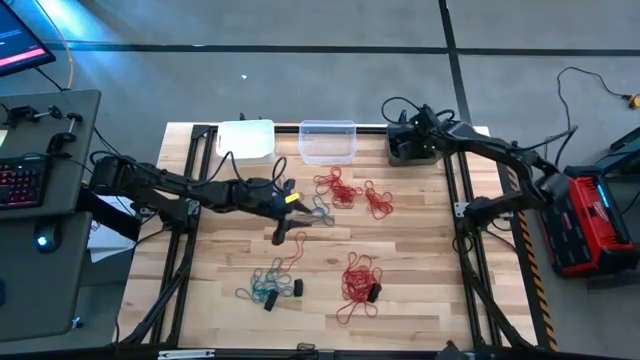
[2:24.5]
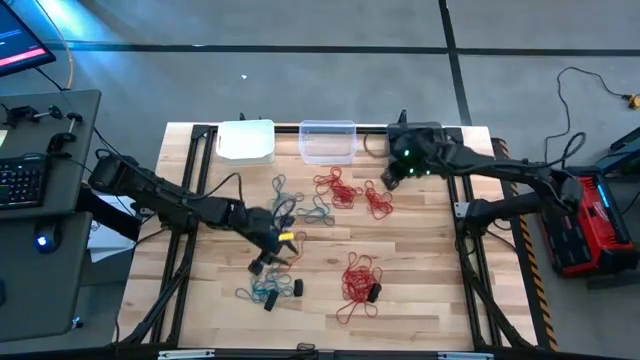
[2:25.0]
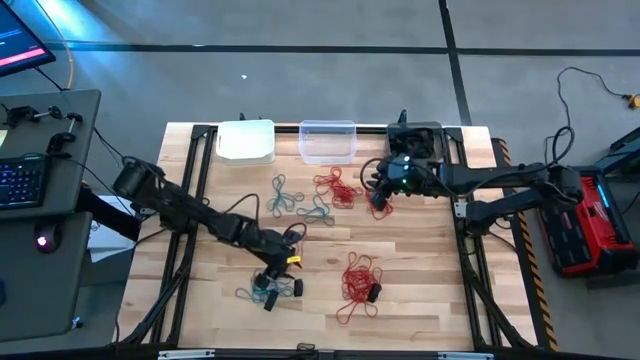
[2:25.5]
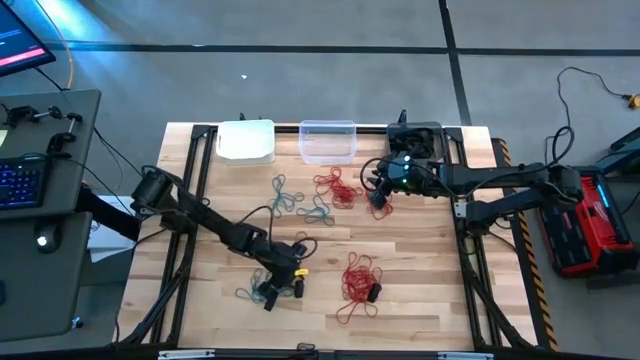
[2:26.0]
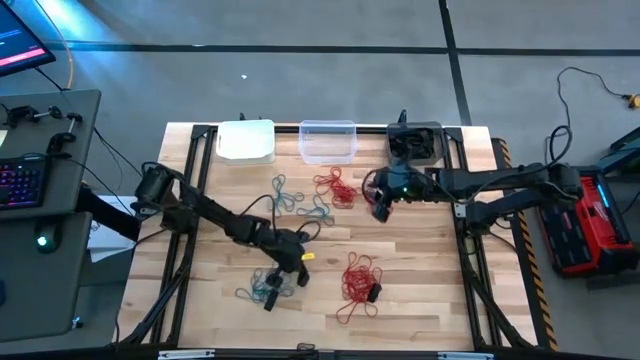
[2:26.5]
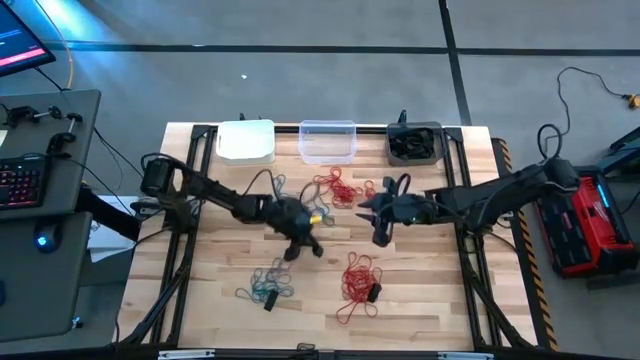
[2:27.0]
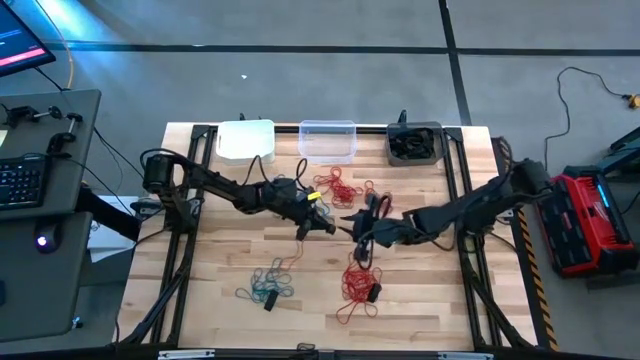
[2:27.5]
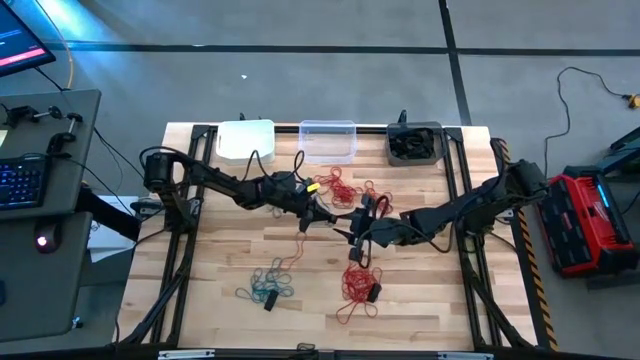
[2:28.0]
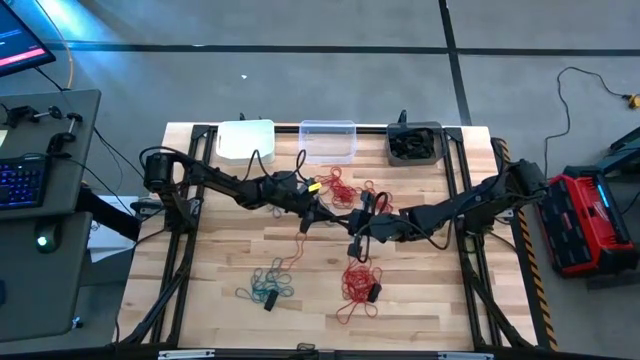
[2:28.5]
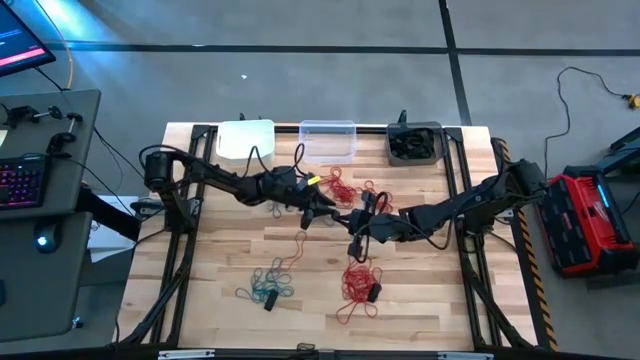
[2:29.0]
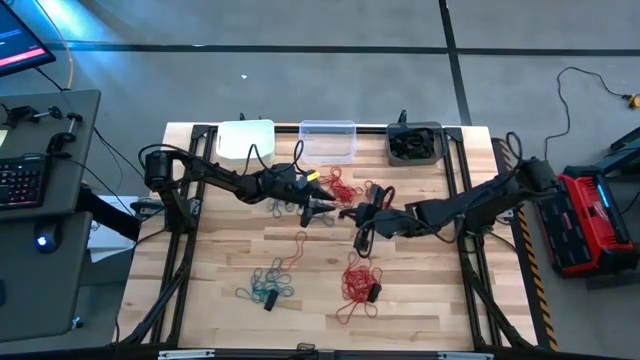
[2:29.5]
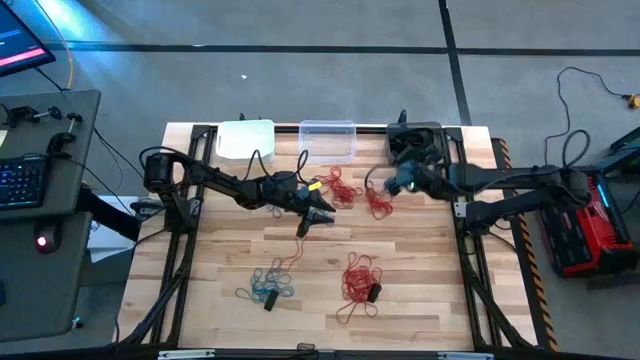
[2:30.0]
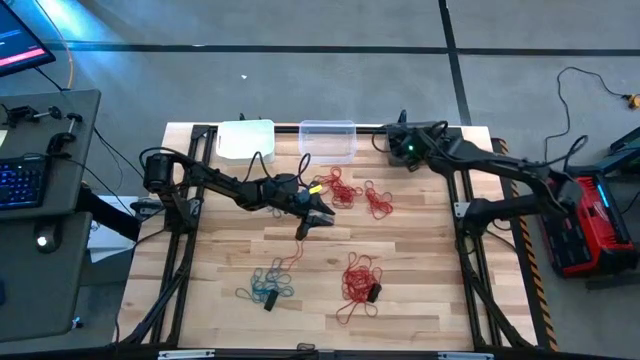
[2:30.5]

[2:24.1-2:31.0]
Task: Sort rubber bands into baskets
Put the black rubber band into the black bin

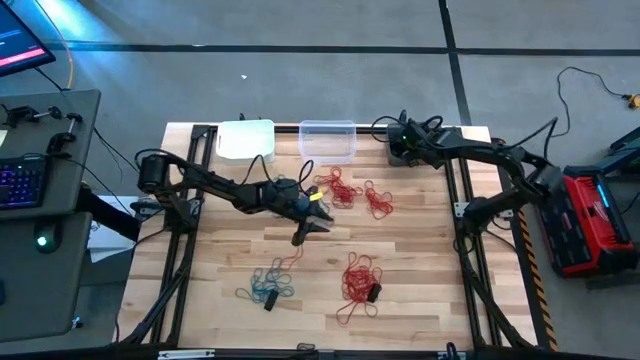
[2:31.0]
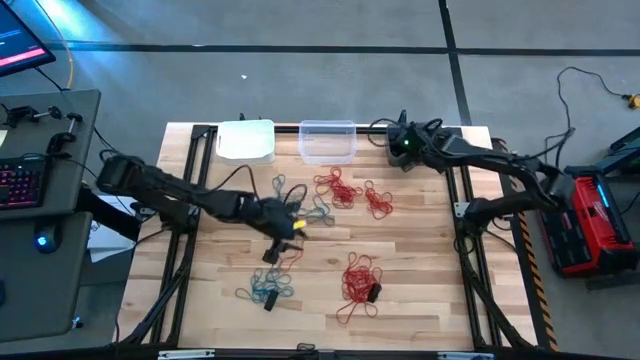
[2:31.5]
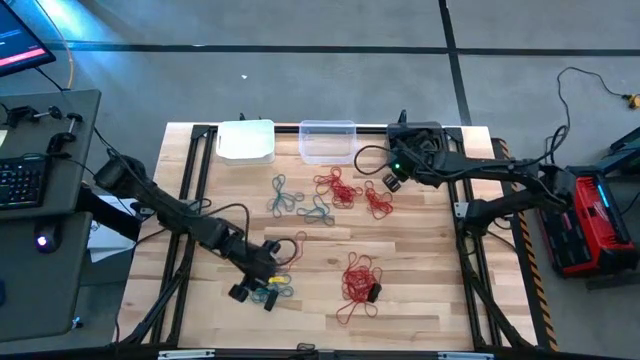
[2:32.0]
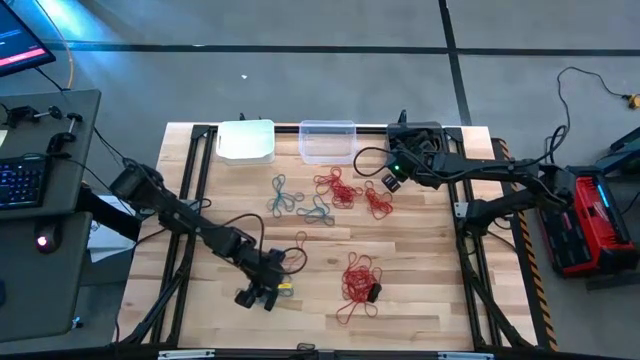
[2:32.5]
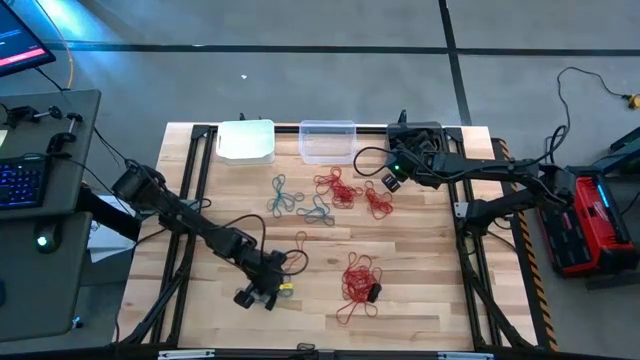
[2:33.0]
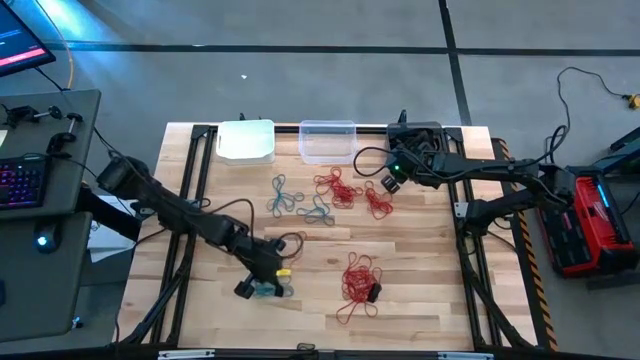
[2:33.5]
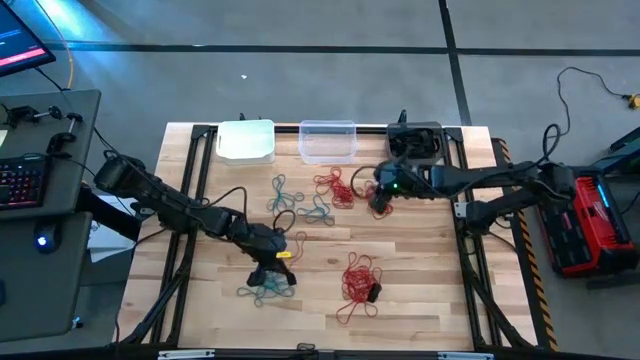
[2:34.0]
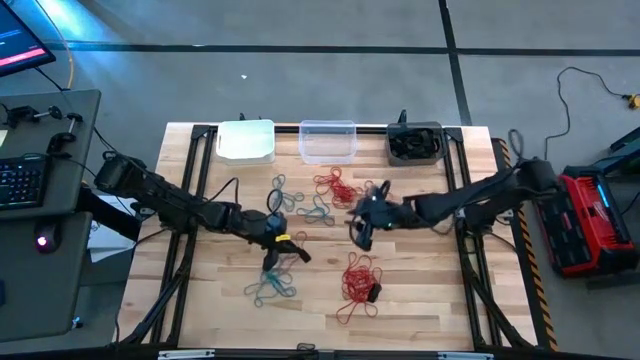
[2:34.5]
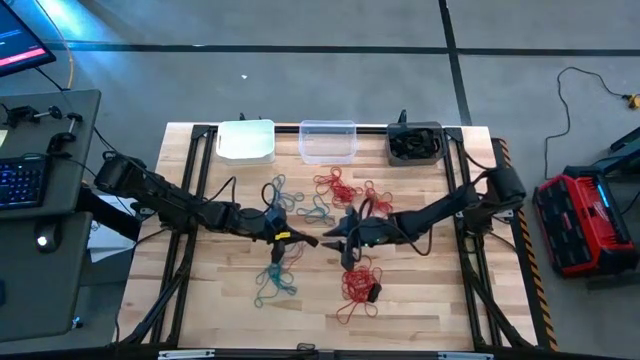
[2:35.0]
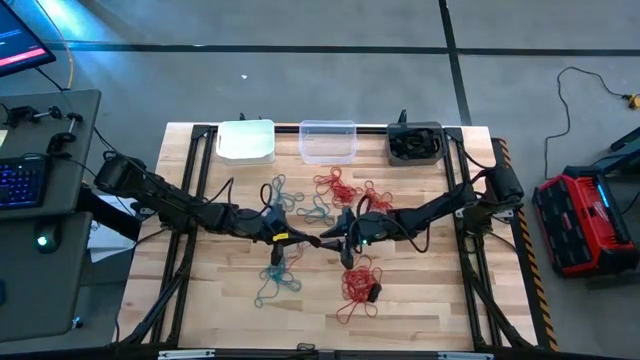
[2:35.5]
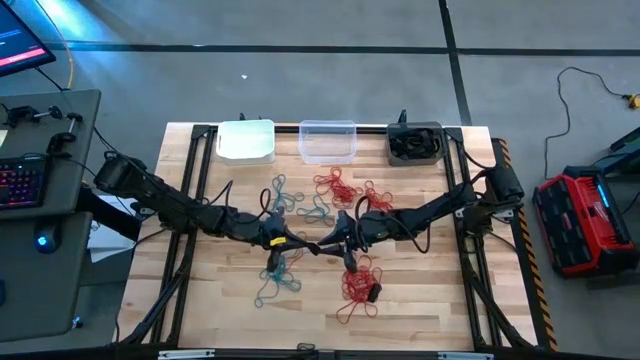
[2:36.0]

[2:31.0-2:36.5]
Put the black rubber band into the black bin

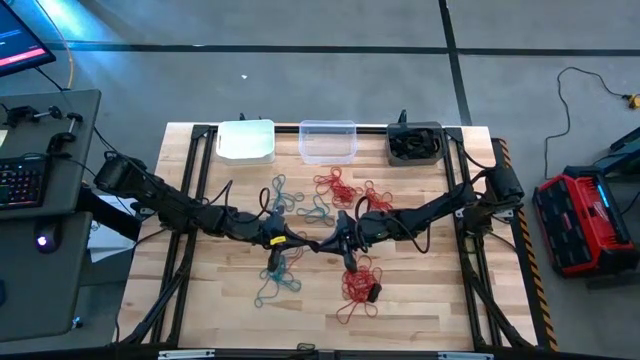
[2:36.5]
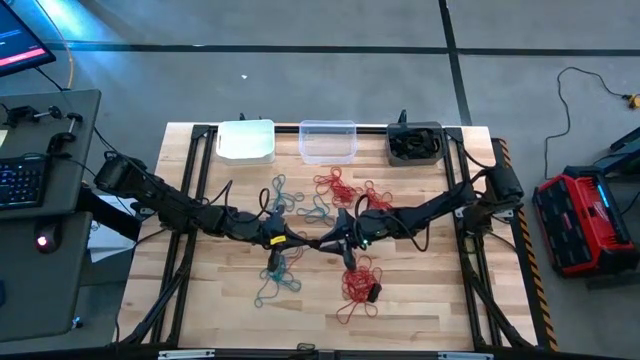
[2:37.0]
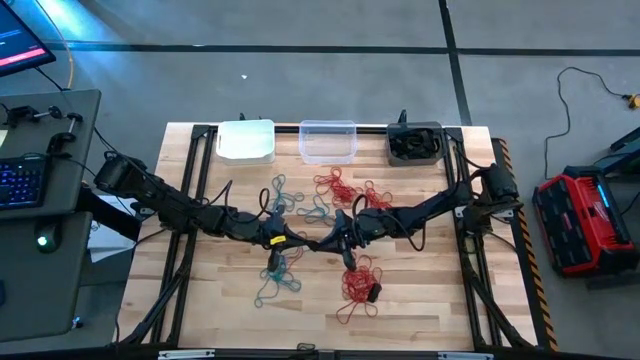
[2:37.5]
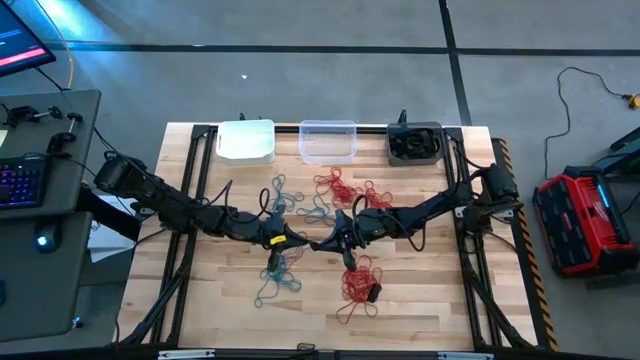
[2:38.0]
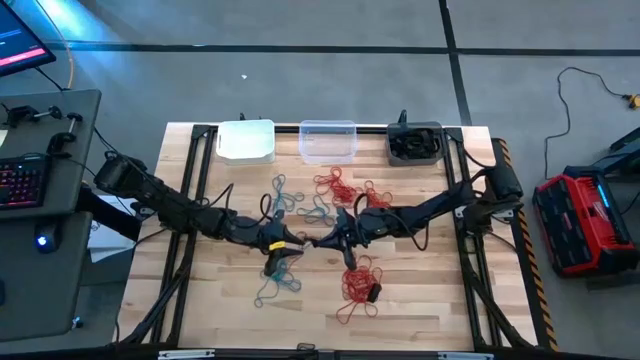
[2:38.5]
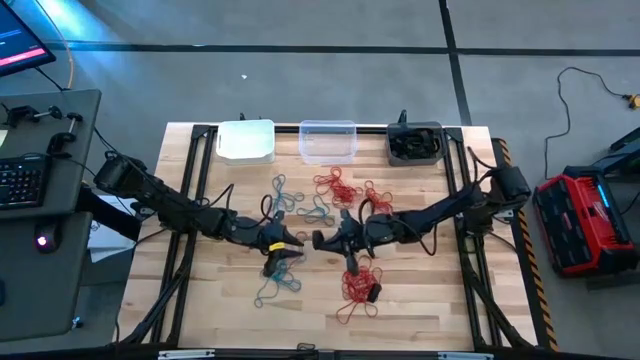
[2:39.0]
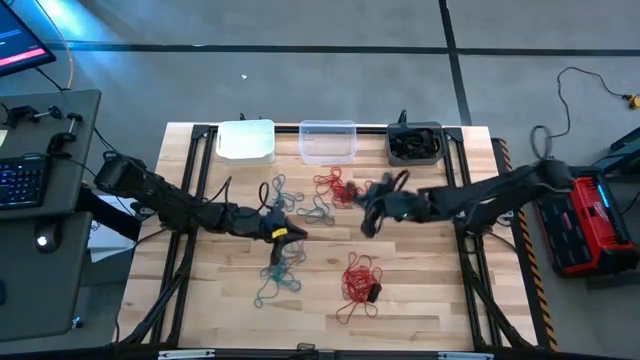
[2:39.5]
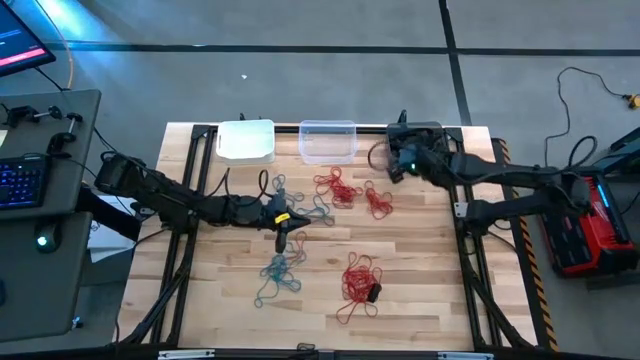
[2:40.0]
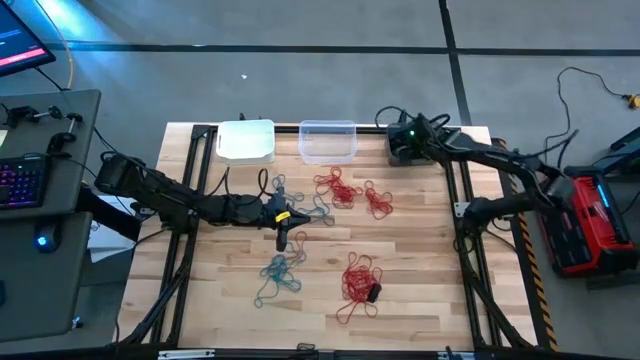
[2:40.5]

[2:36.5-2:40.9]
Put the black rubber band into the black bin

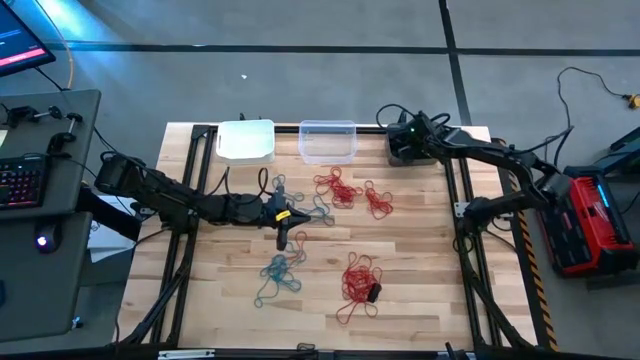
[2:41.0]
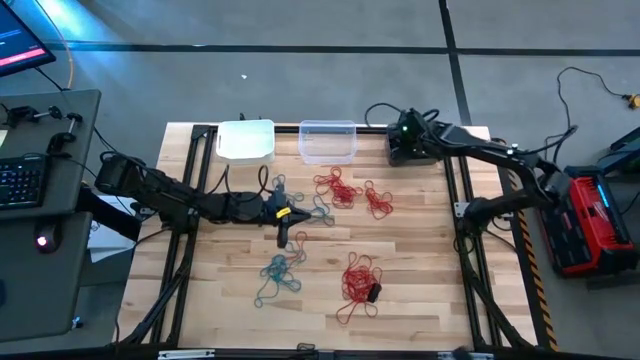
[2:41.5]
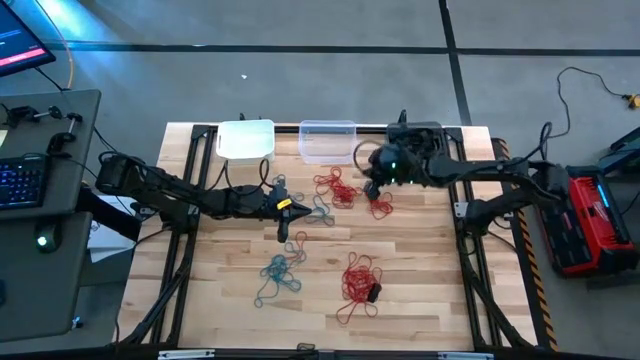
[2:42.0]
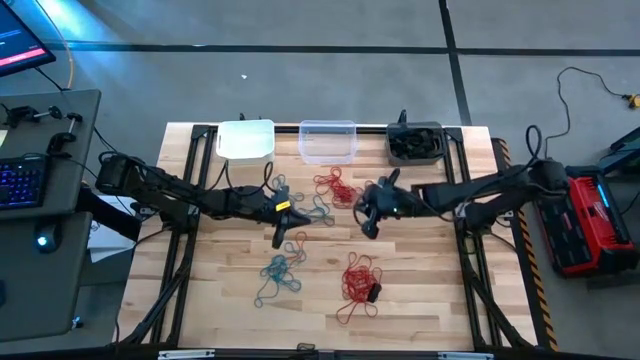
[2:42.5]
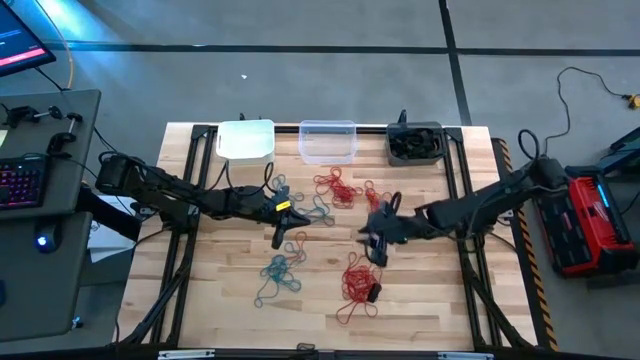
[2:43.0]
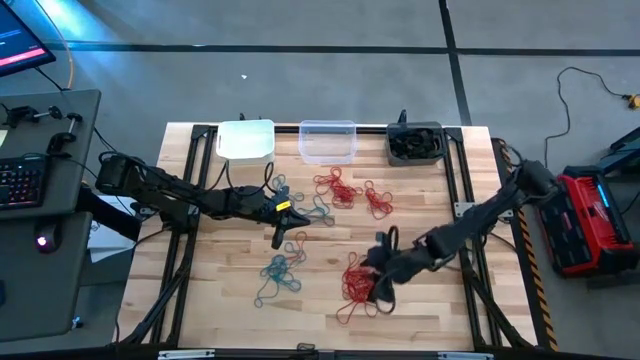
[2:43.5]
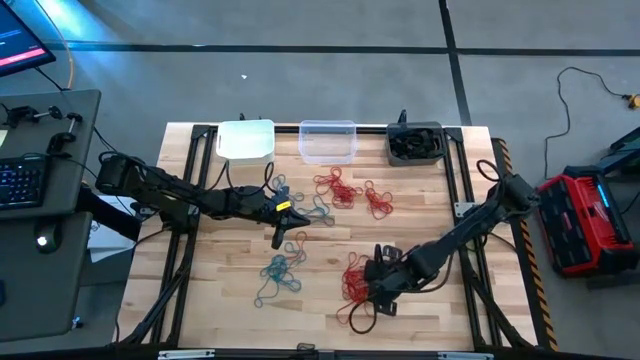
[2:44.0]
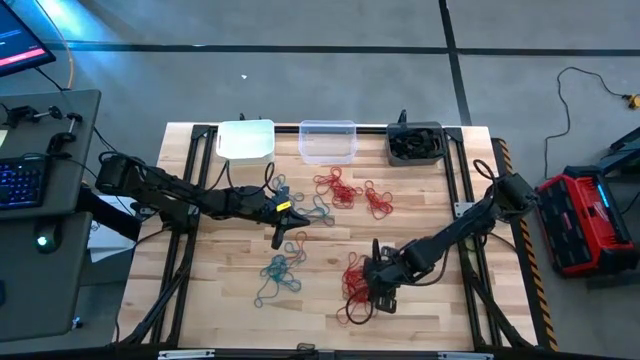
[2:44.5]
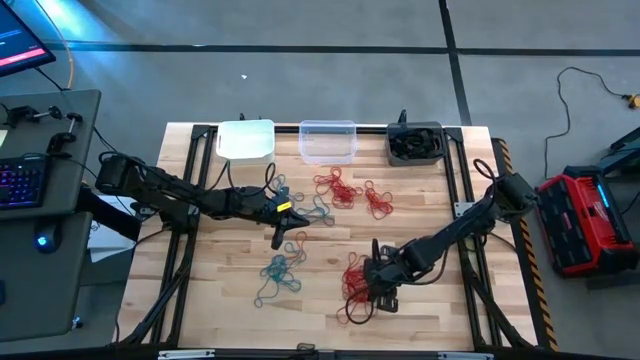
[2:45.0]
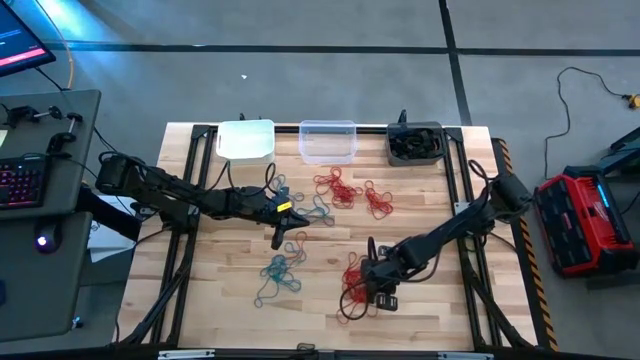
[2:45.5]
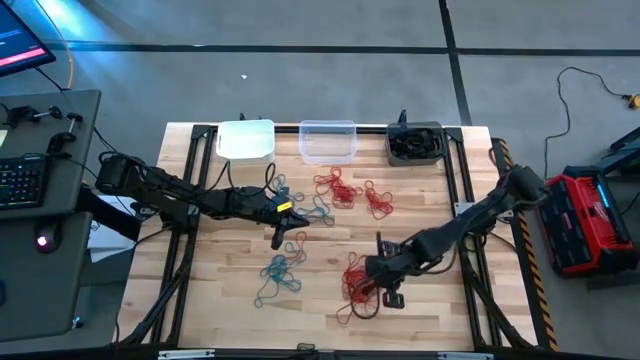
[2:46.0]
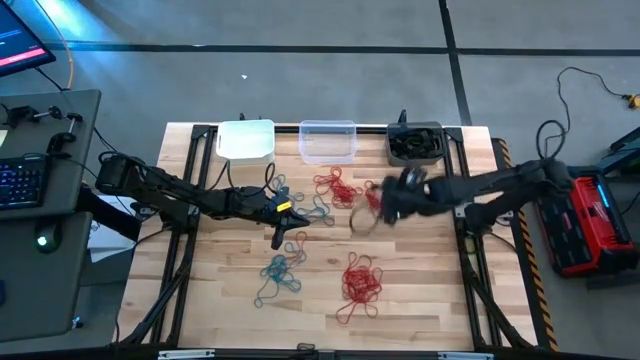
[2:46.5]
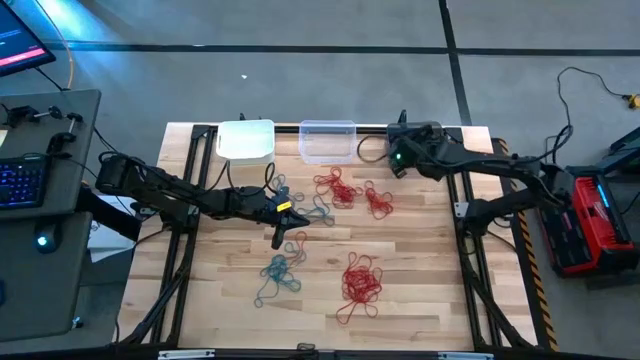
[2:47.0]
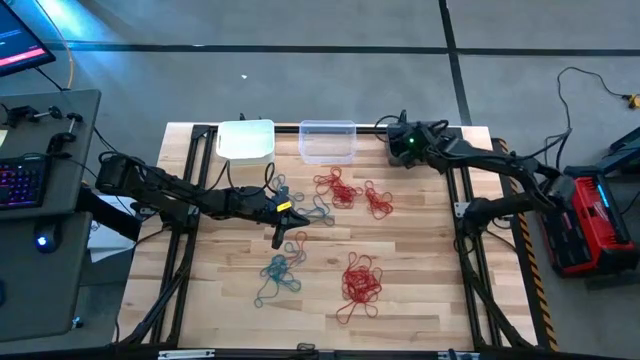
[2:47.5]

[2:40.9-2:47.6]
Put the black rubber band into the black bin
